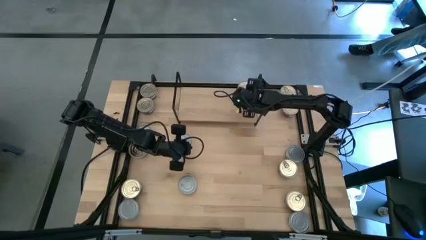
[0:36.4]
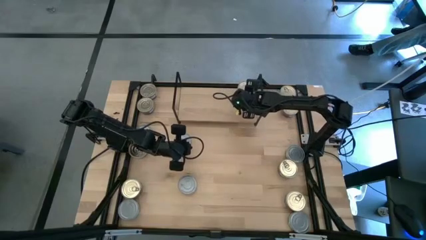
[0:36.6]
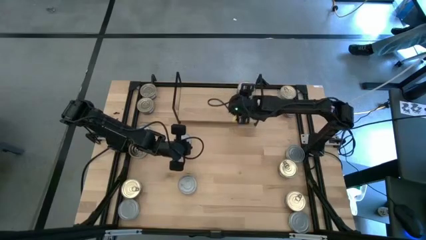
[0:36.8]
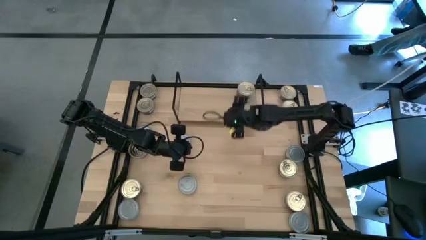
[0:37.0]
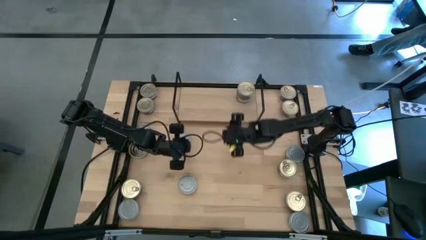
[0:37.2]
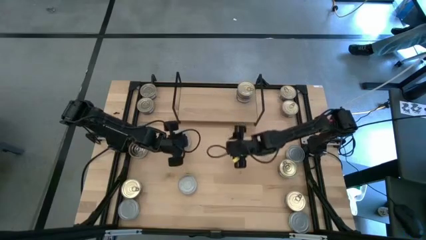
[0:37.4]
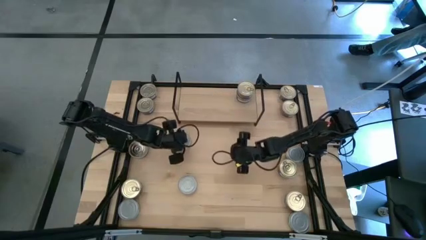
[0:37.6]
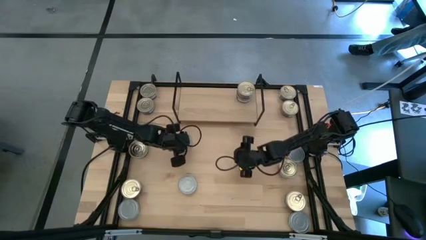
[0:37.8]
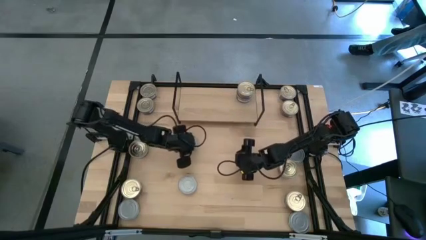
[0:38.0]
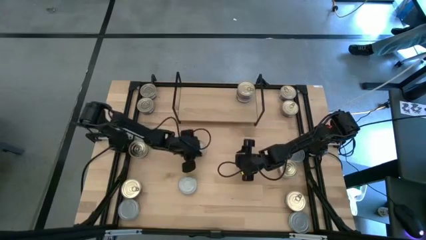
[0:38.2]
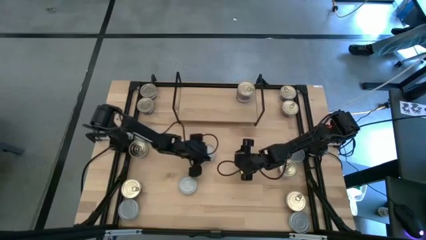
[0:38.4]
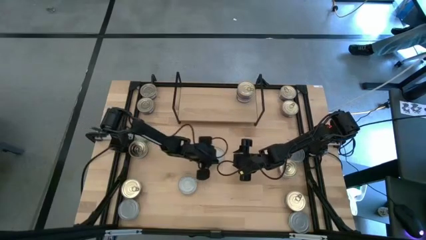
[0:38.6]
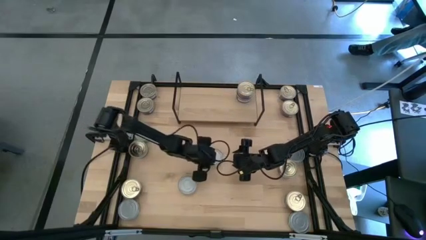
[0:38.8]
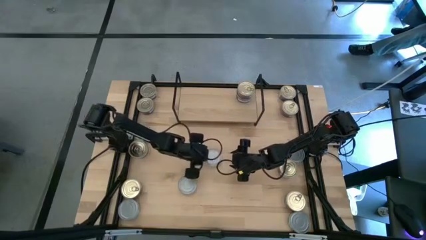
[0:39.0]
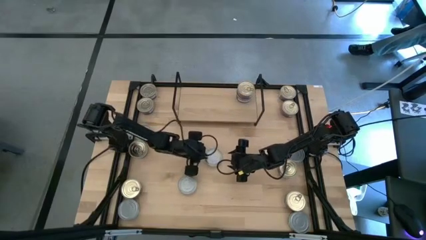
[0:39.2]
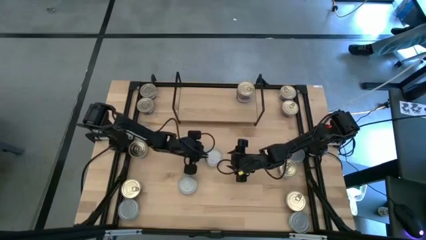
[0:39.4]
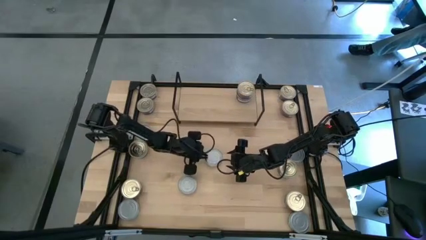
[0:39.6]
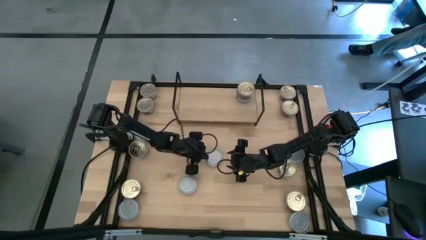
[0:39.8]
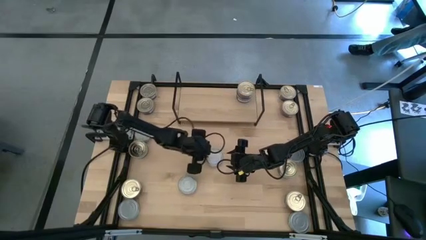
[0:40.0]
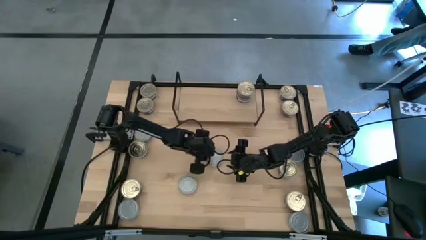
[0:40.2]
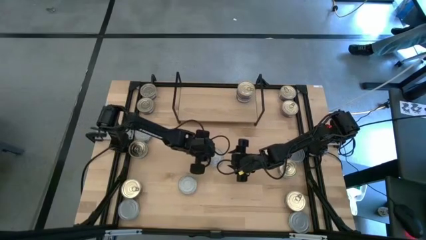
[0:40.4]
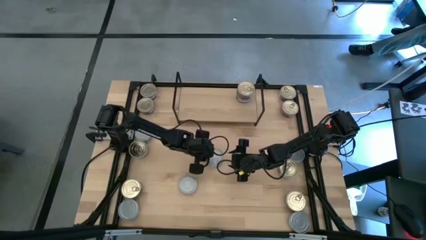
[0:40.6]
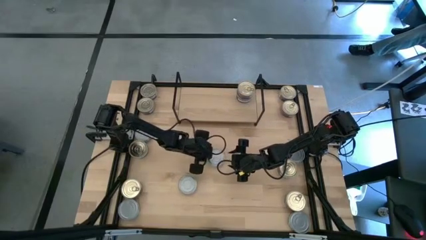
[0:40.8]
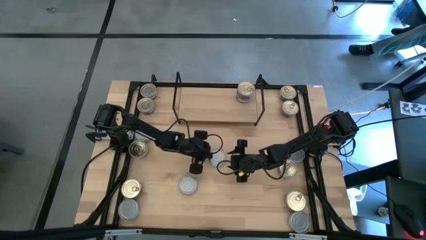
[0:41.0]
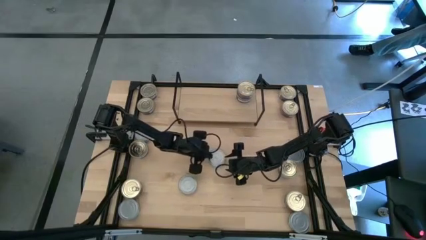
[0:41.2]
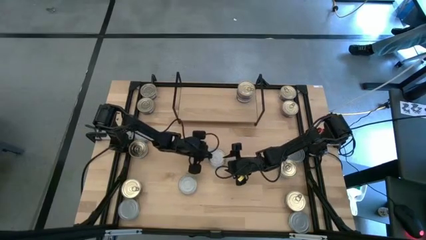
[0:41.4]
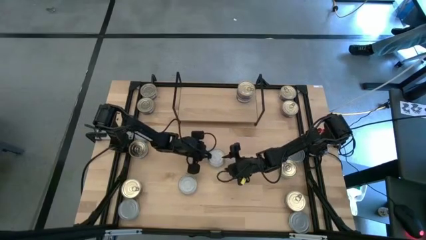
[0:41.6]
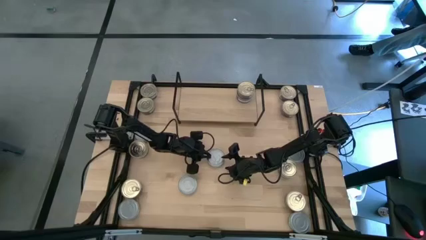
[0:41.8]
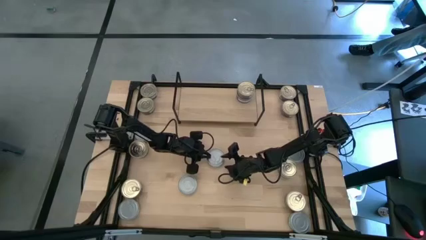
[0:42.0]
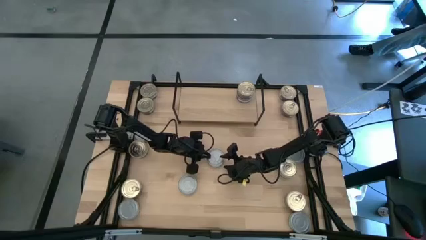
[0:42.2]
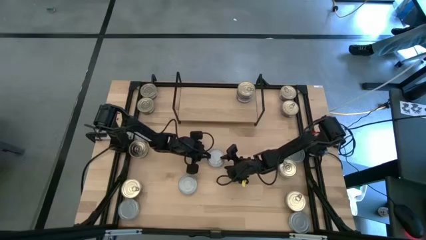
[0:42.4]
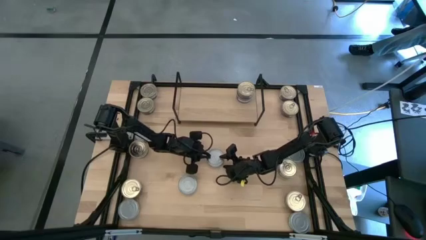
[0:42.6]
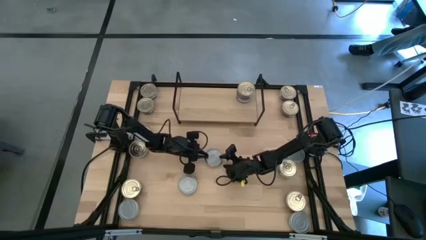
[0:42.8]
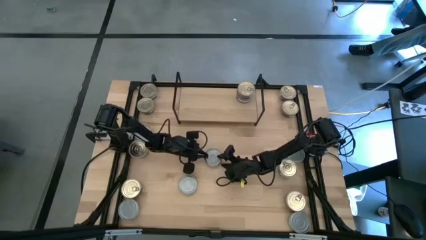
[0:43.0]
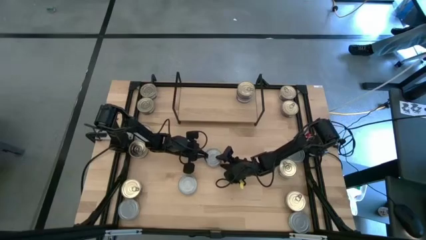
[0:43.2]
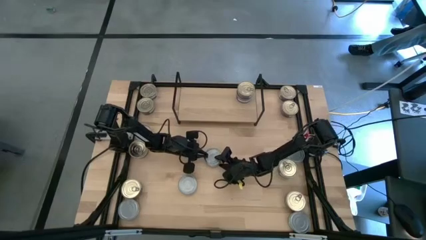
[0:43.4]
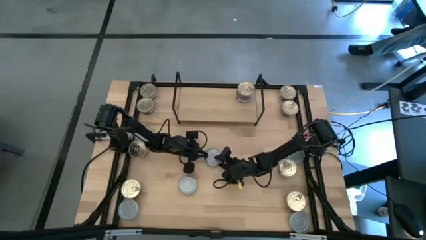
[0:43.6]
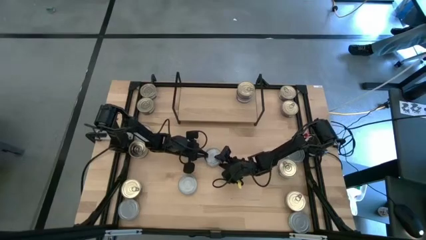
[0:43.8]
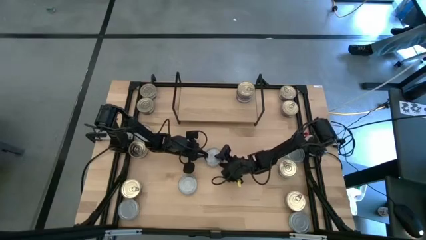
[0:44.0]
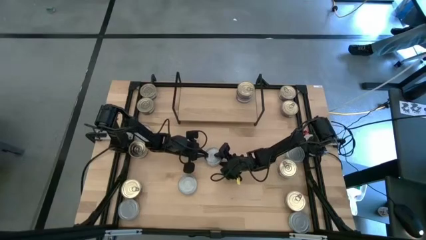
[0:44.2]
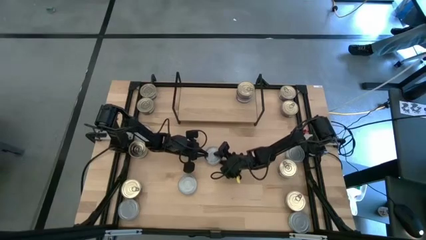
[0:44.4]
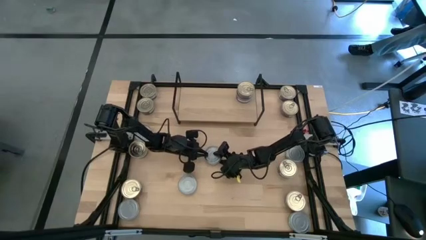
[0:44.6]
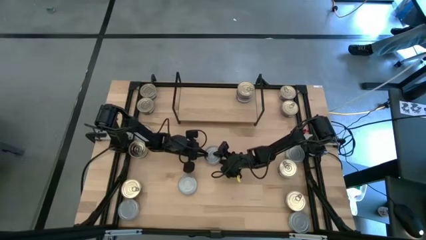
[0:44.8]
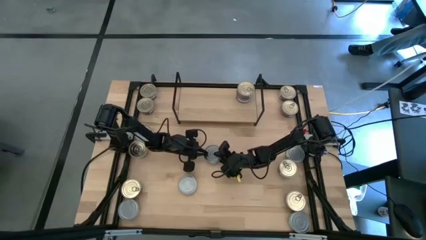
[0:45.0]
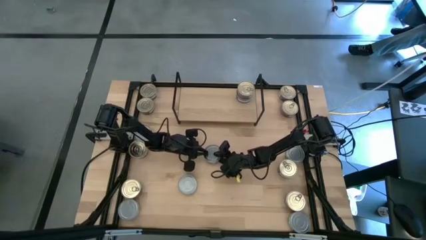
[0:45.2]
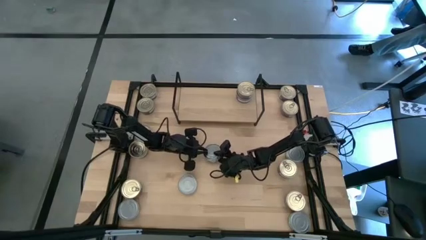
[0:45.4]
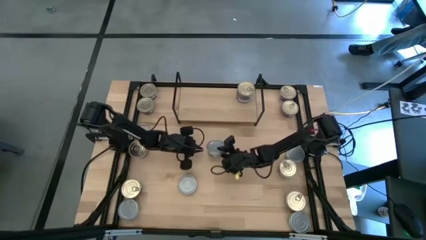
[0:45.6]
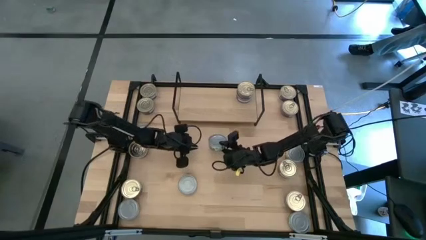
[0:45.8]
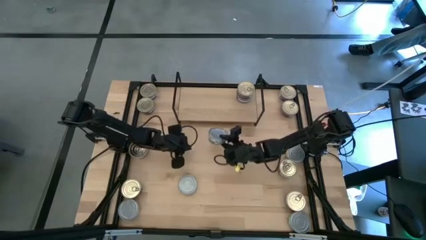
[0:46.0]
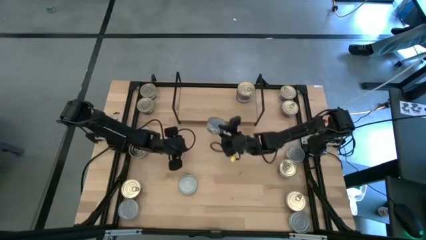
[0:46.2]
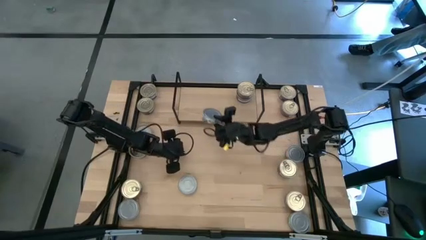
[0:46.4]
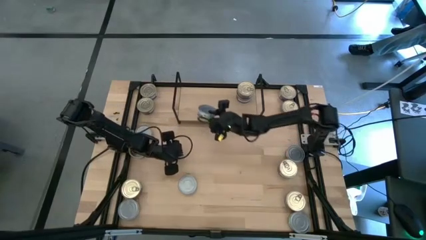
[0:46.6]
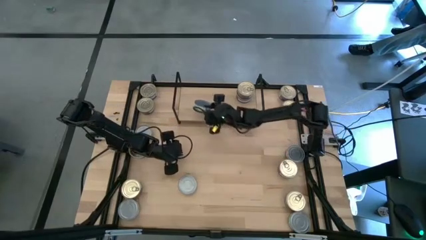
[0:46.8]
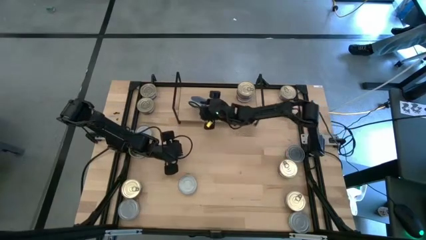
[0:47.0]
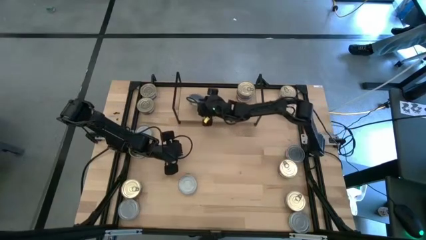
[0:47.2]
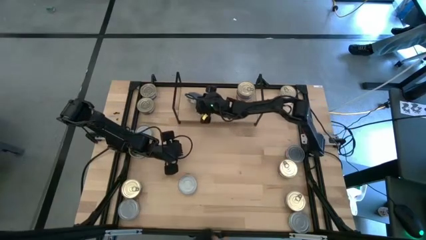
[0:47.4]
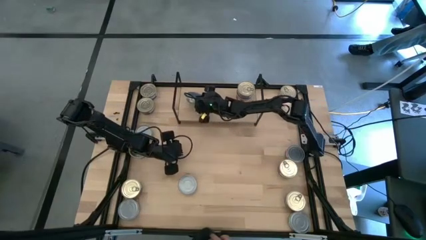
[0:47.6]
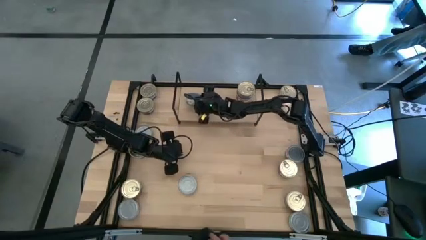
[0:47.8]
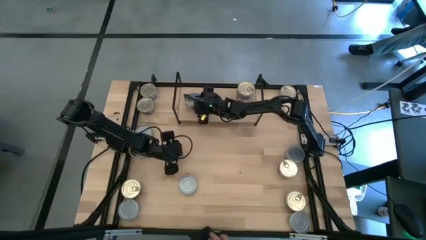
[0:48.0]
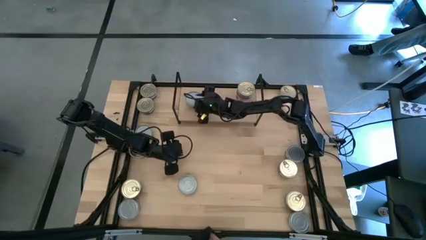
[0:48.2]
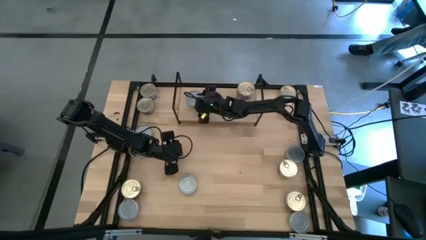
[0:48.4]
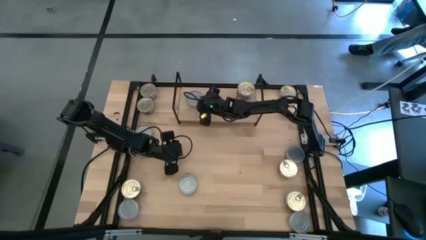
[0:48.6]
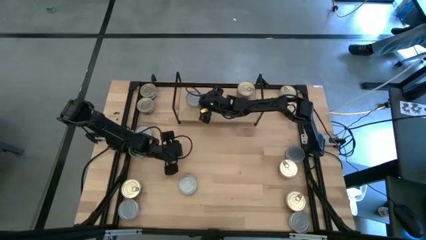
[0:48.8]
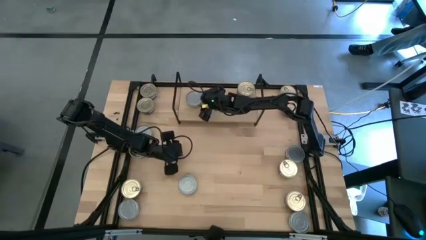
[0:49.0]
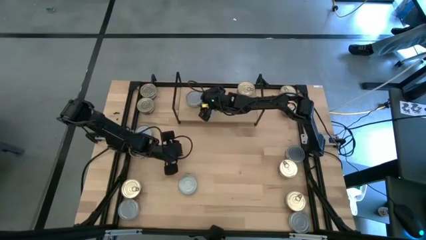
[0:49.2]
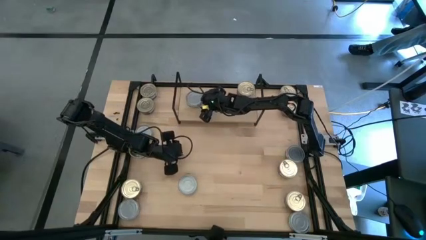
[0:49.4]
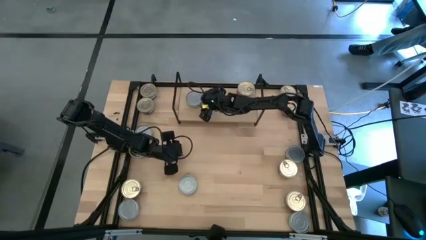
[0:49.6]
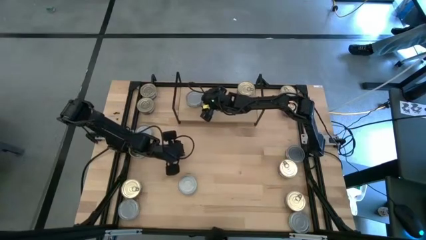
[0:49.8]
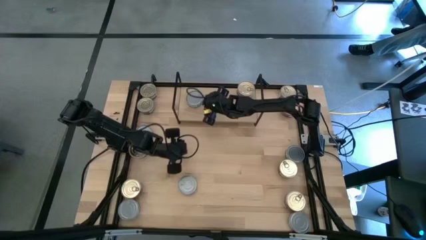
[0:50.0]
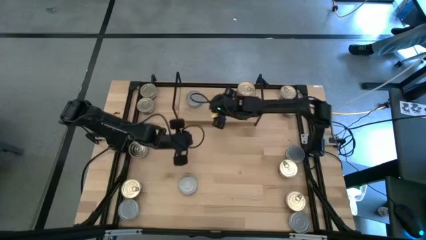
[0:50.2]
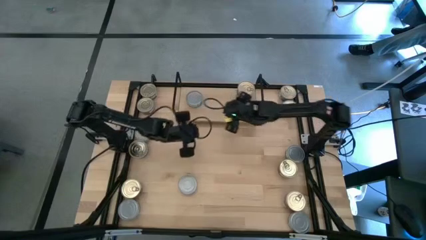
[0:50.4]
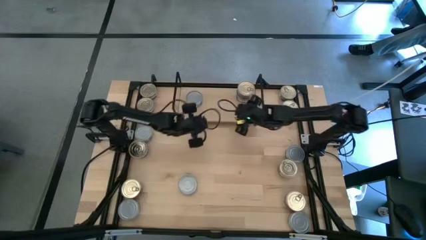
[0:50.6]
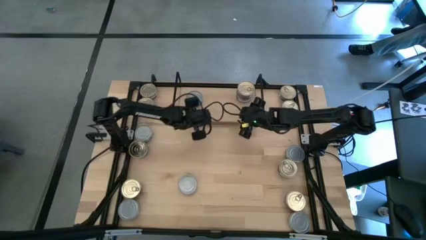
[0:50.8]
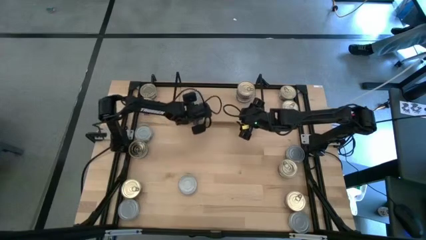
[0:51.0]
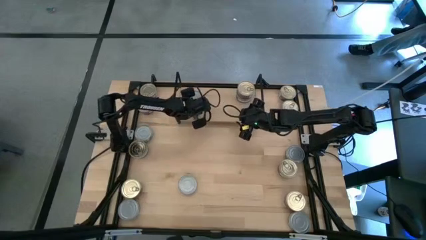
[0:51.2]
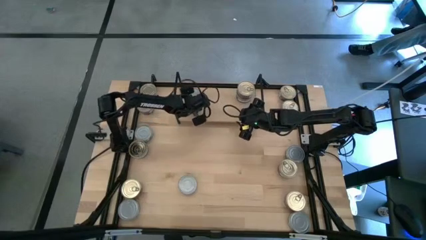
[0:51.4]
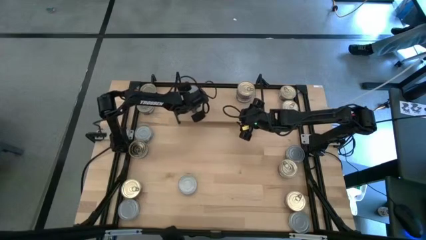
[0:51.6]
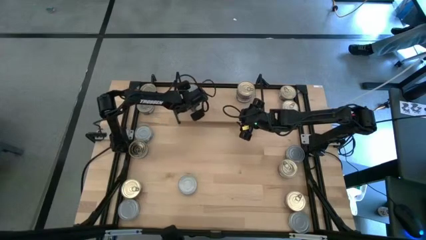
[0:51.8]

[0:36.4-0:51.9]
Task: Stack canned seafood by type on shelf
Put the green white tuna can on the shelf

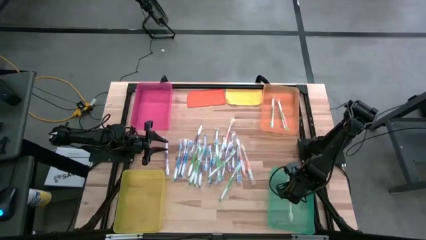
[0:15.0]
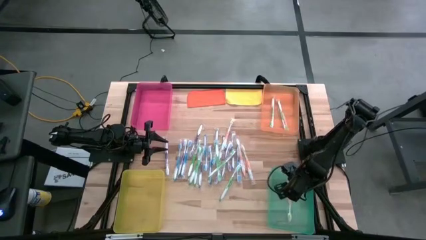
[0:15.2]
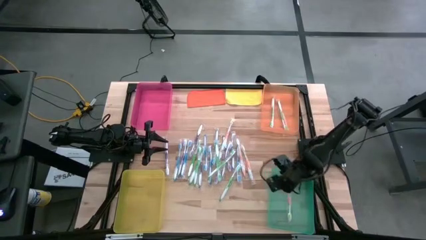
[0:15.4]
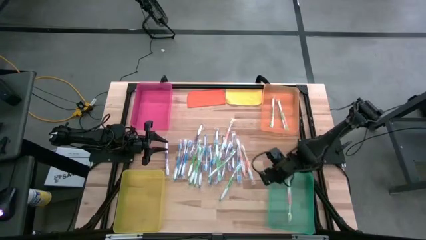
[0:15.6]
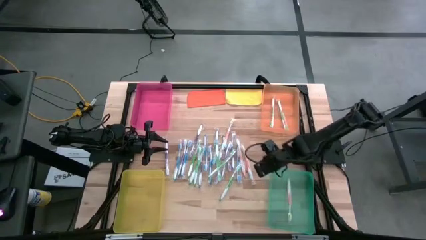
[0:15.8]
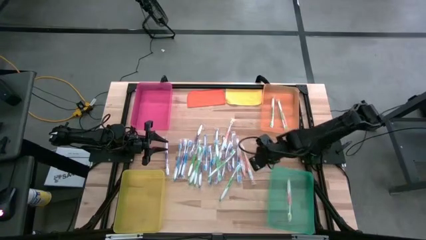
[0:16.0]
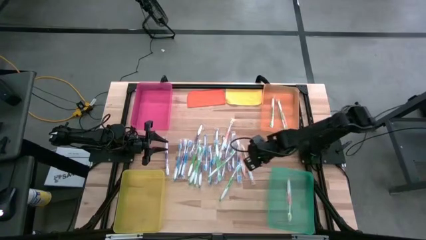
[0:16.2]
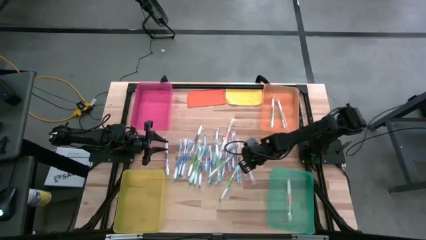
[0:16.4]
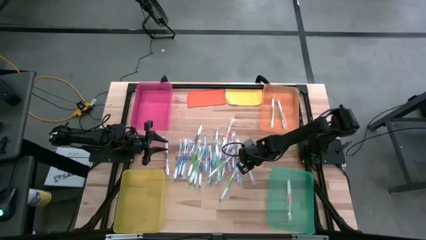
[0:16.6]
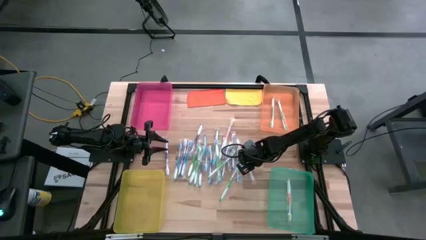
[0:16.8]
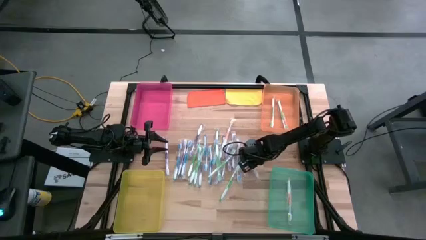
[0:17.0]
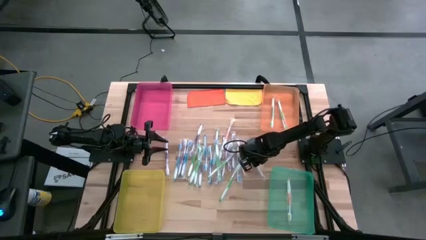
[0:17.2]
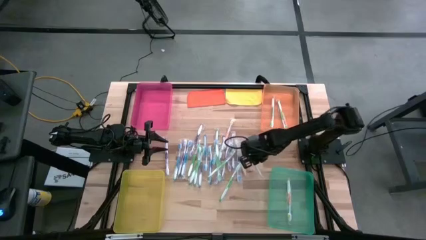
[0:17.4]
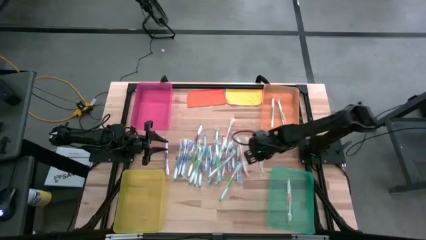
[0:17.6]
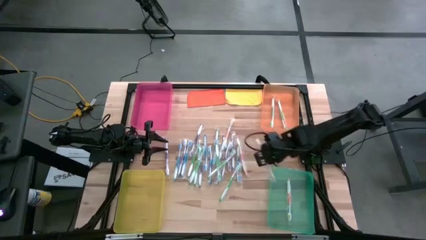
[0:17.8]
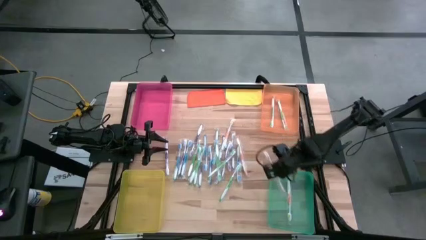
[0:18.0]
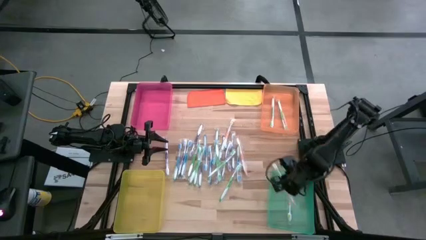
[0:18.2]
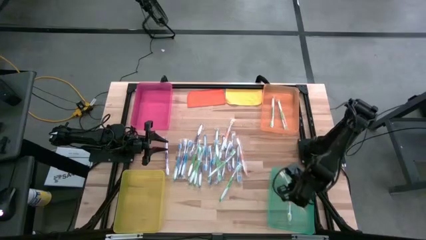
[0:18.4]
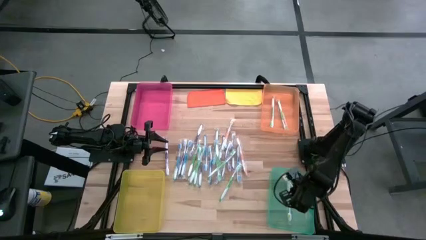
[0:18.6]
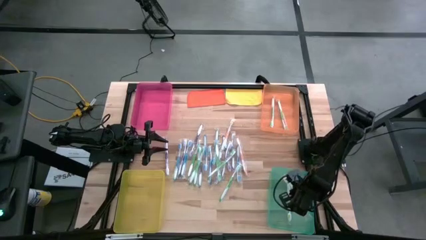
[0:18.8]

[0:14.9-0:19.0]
Task: Pick & Place Toothbrushes
Put the orange toothbrush into the green bin
